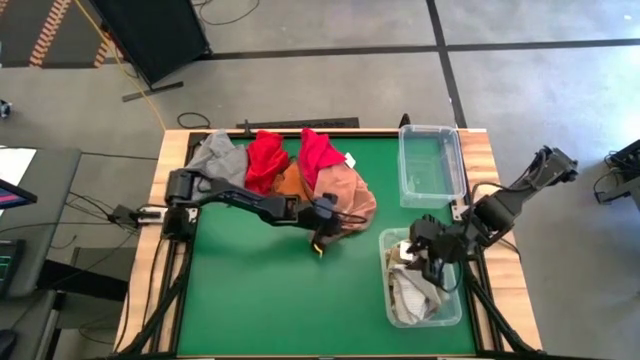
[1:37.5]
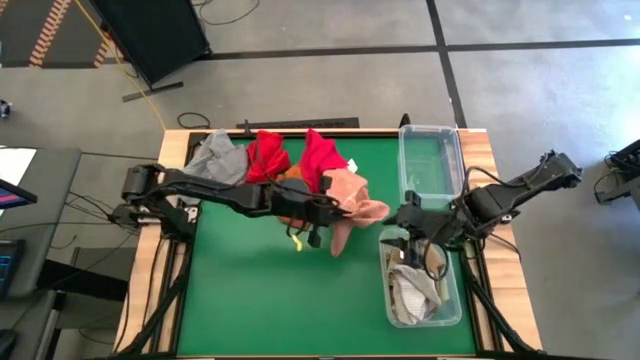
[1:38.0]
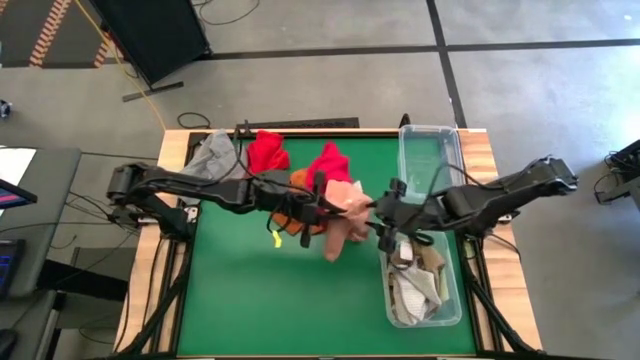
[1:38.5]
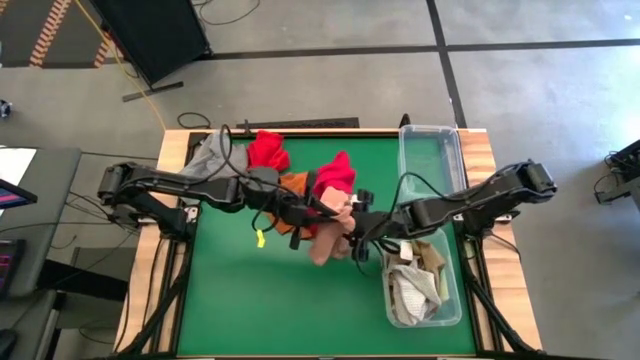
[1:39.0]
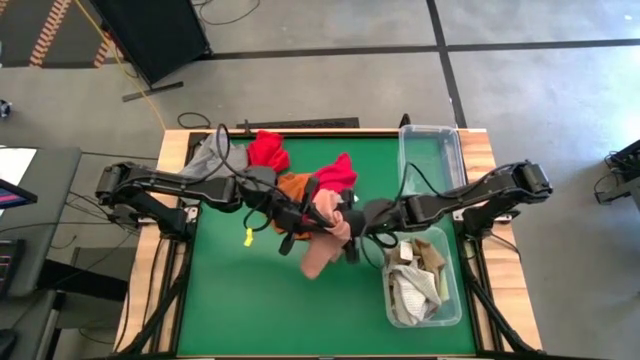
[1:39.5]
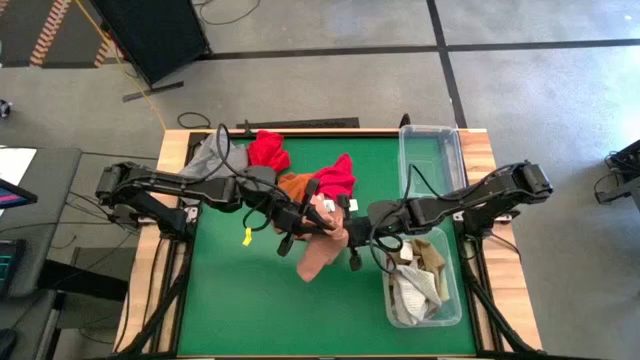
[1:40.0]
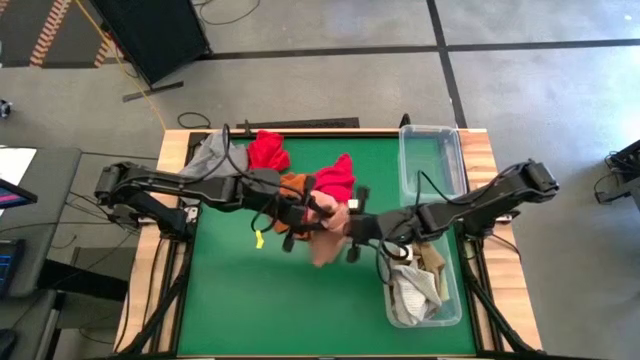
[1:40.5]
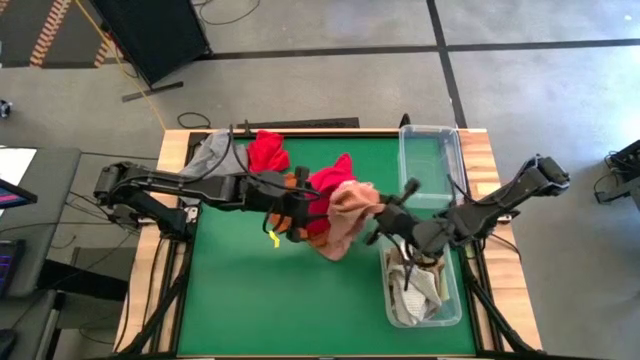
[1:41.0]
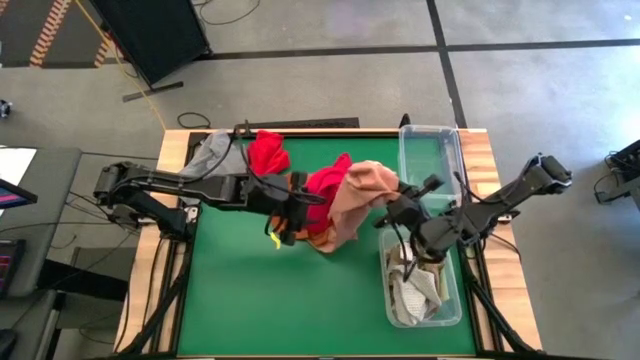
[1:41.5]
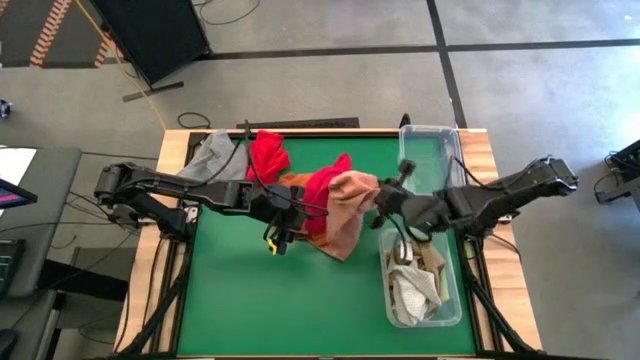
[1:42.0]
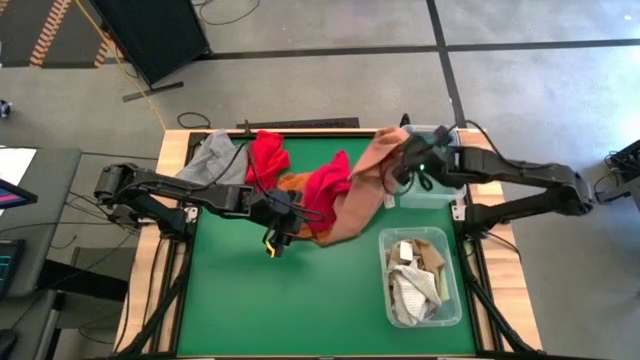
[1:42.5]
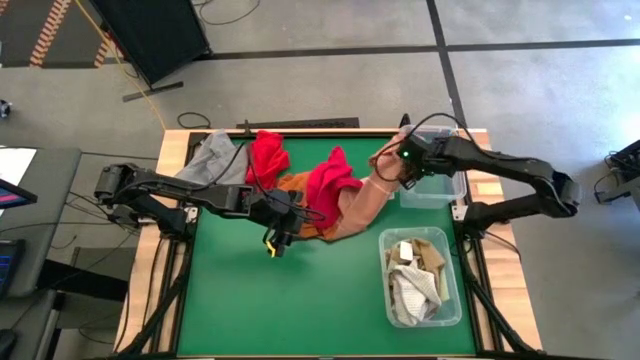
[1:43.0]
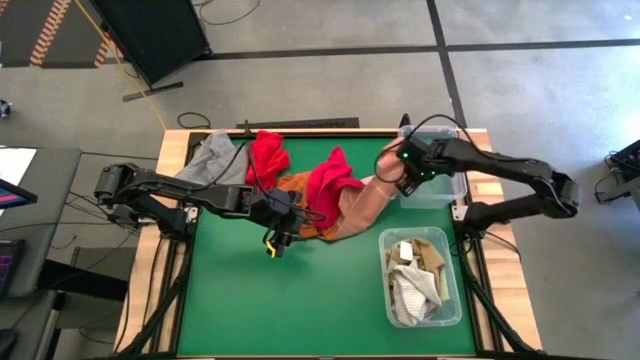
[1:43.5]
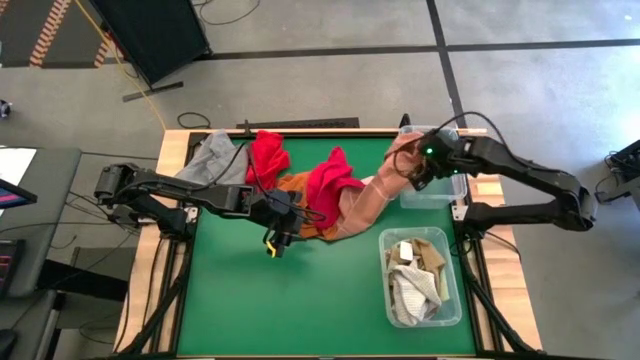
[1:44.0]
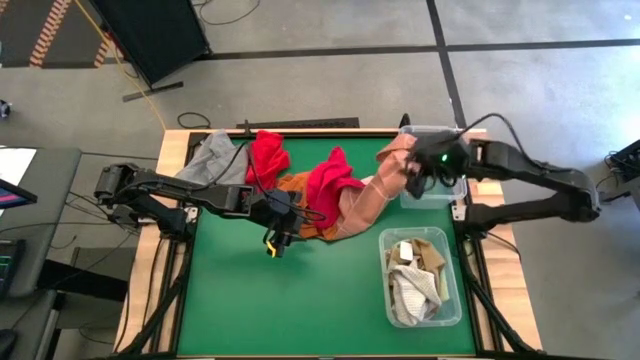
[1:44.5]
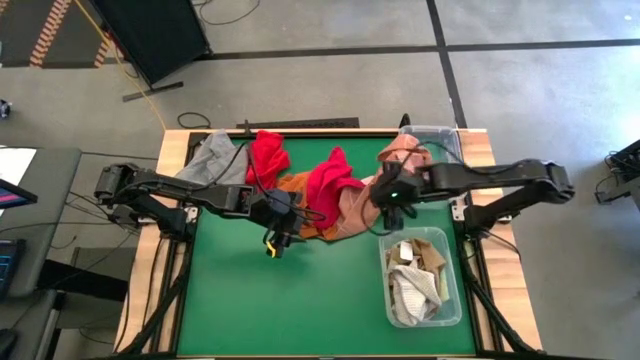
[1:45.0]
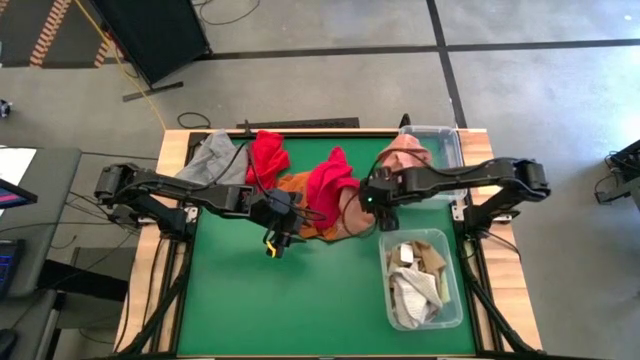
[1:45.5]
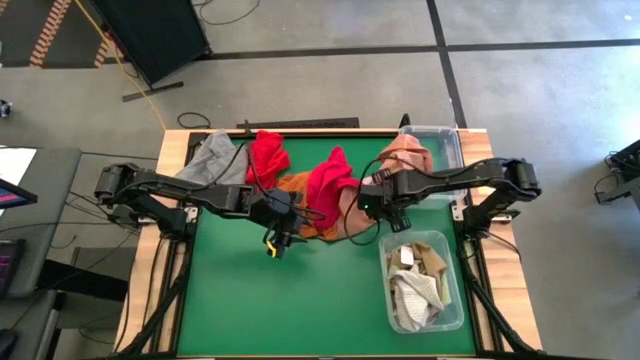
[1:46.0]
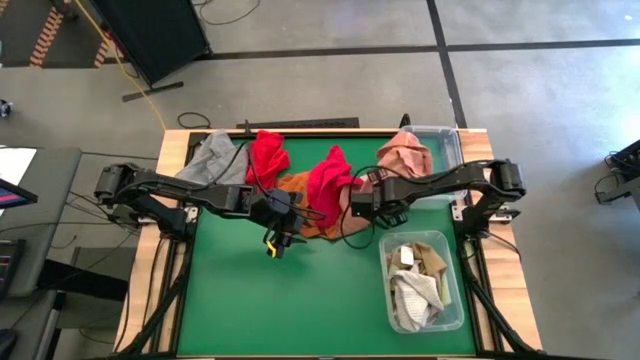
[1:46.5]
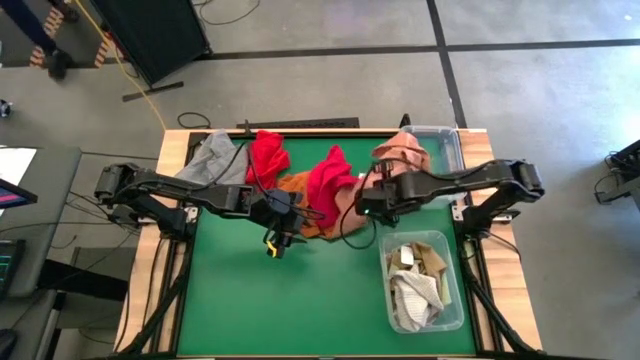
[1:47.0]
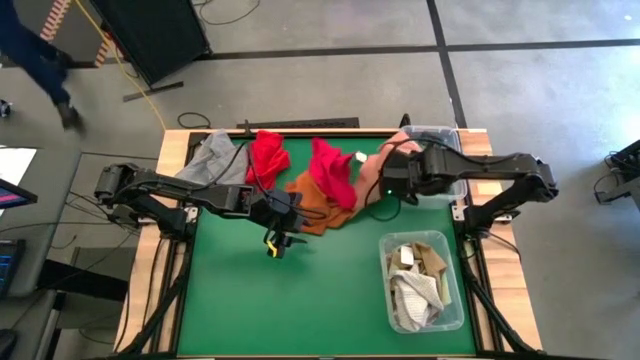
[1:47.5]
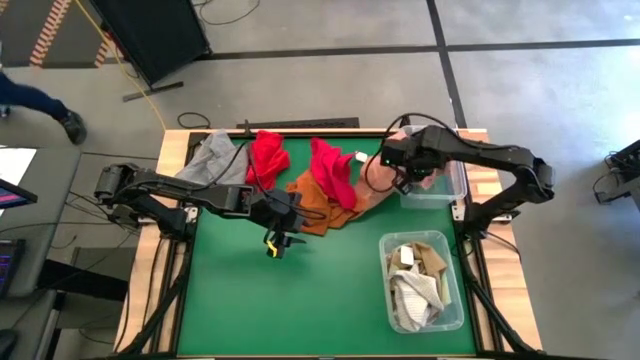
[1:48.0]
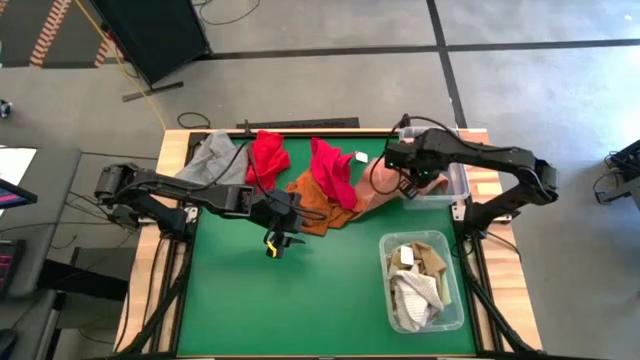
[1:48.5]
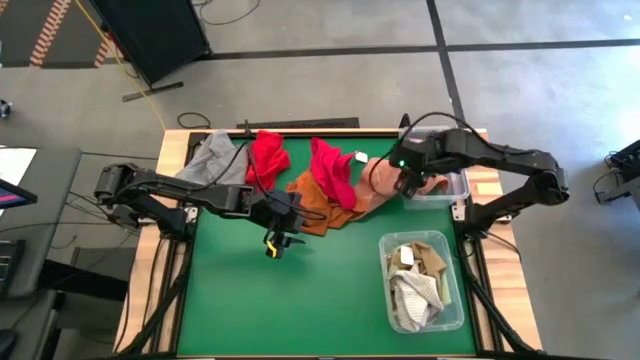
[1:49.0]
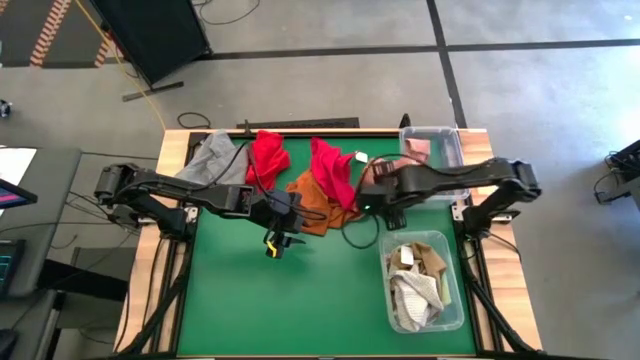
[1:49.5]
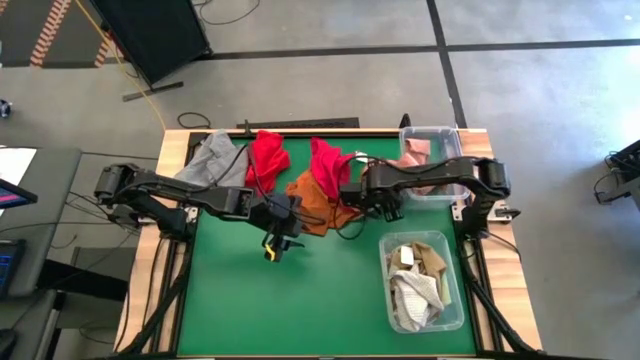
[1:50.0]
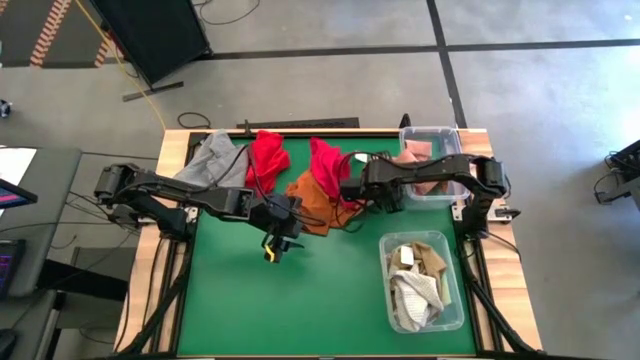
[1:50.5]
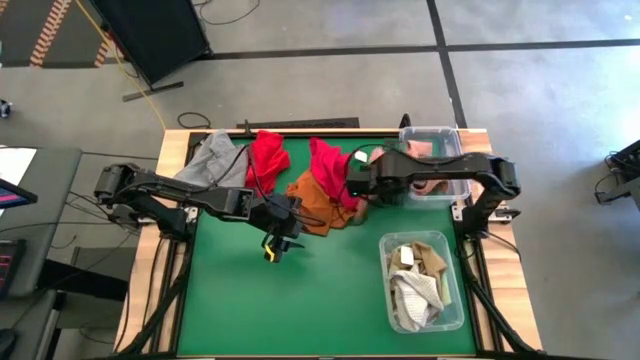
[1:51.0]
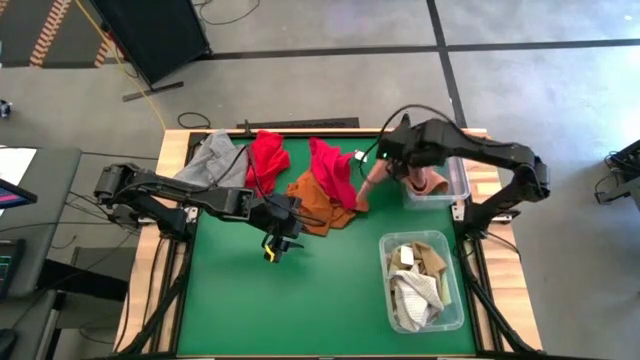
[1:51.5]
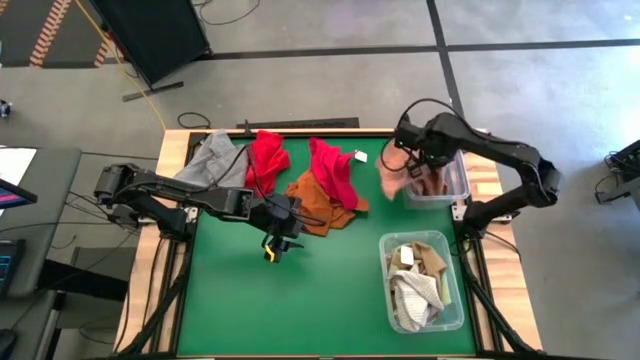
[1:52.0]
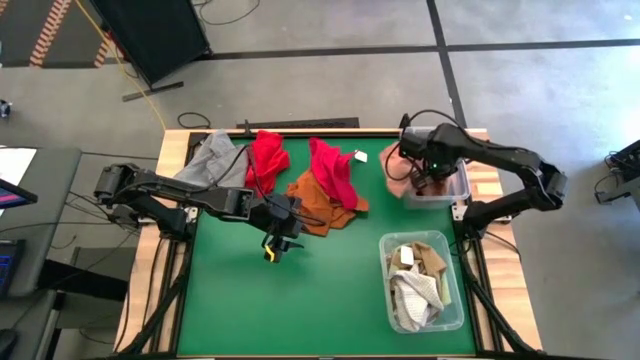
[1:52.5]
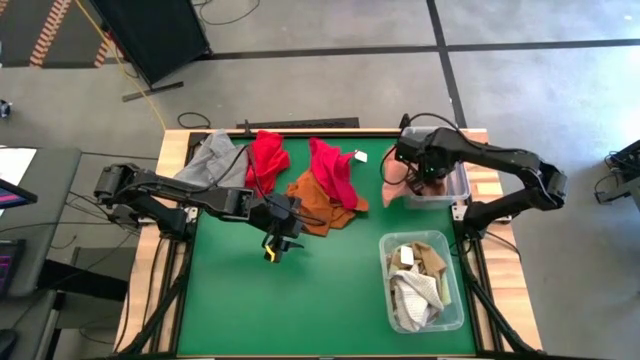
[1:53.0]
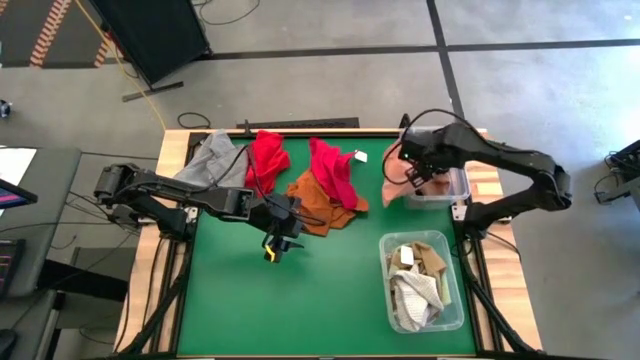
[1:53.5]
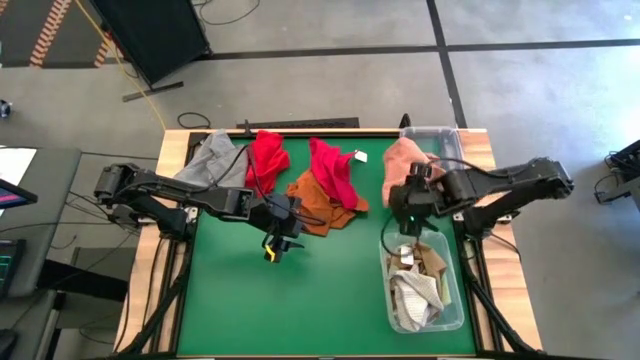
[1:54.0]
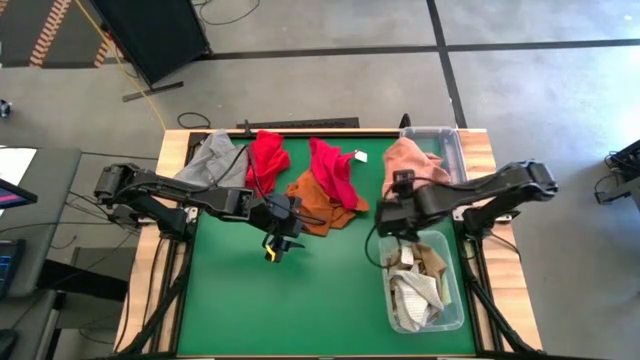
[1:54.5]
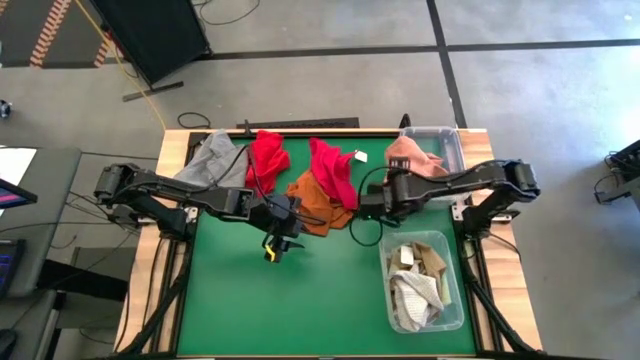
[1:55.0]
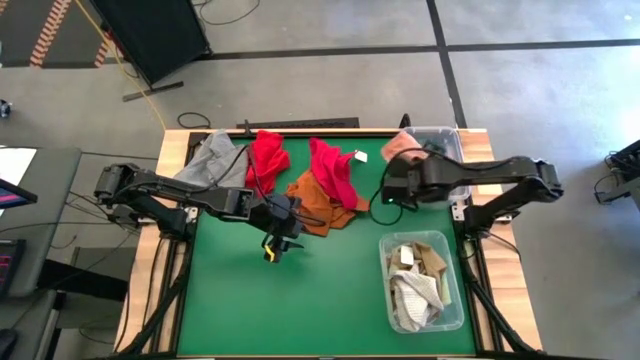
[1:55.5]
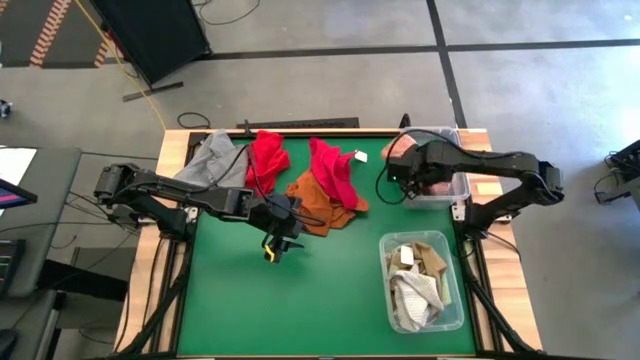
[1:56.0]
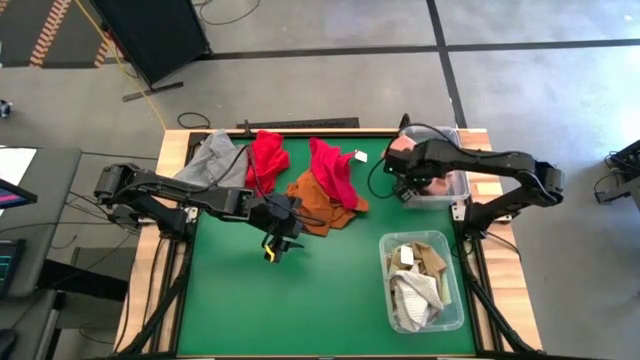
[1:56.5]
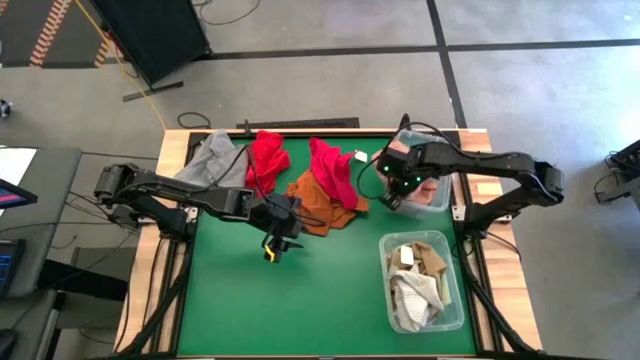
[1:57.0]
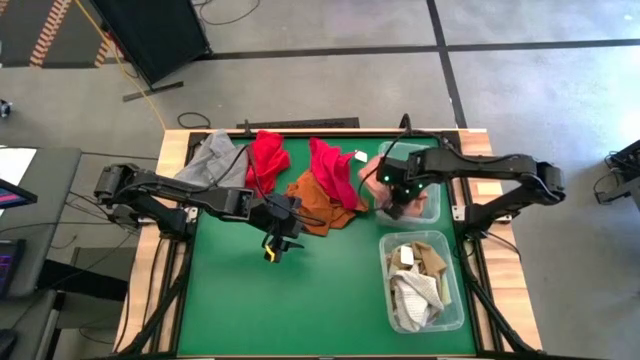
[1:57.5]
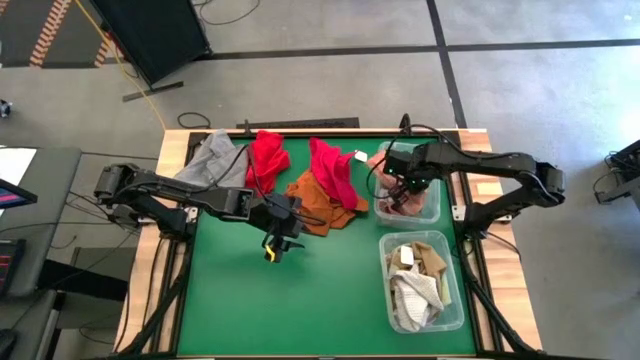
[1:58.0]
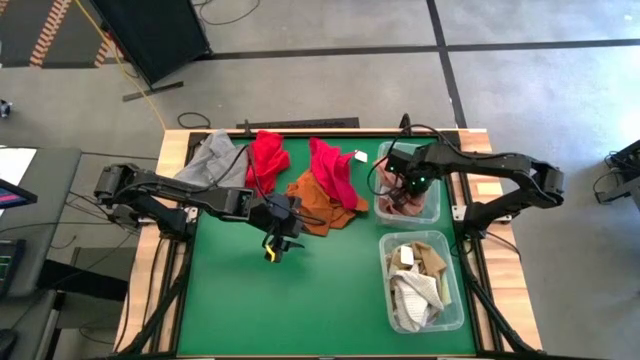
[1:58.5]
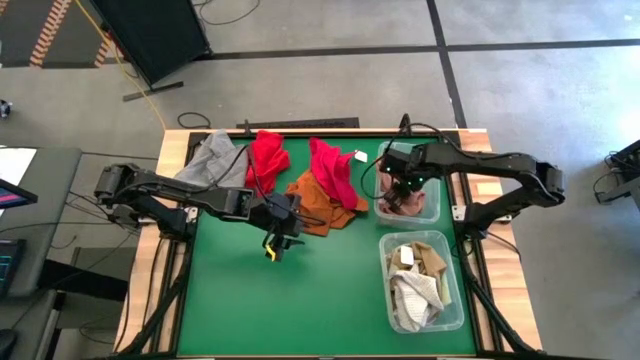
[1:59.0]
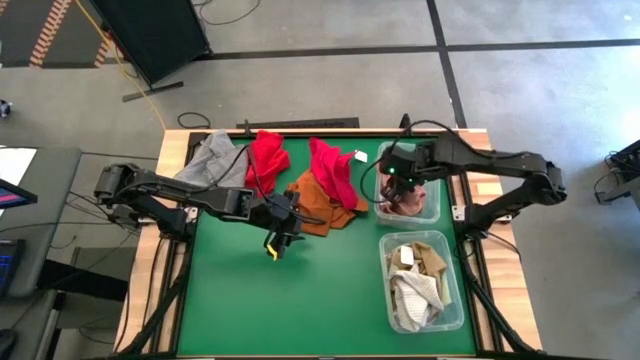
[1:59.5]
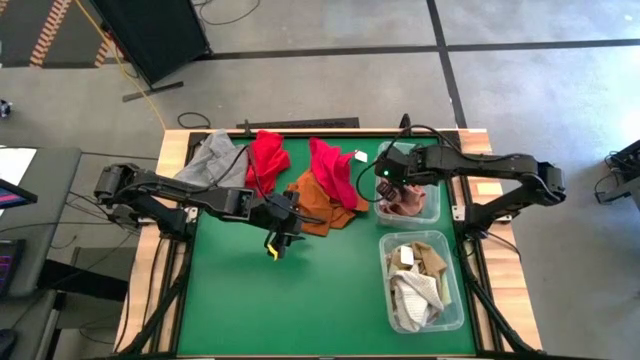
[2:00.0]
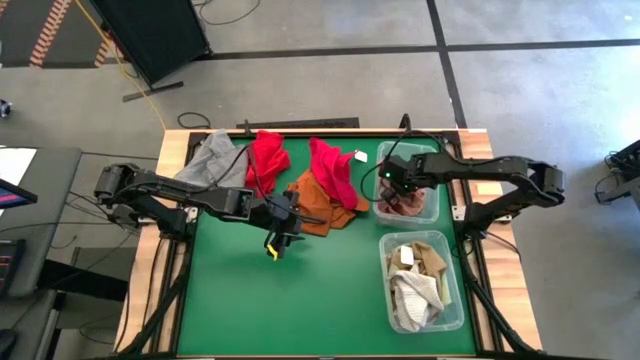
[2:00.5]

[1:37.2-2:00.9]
Task: Sort towels by color in basket
Put the brown patterned towel into the top transparent bin
